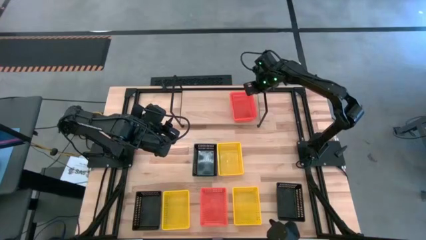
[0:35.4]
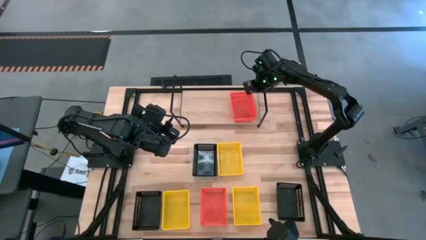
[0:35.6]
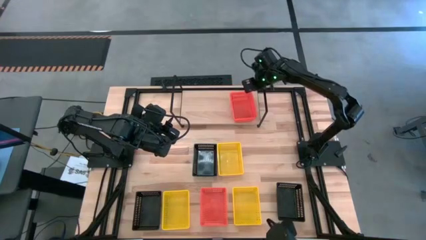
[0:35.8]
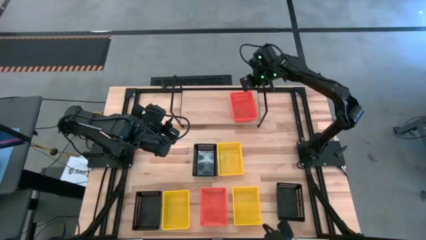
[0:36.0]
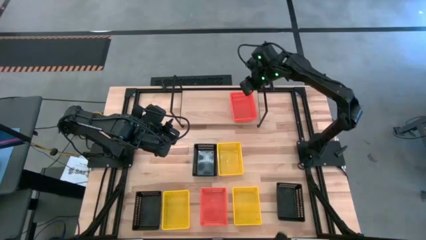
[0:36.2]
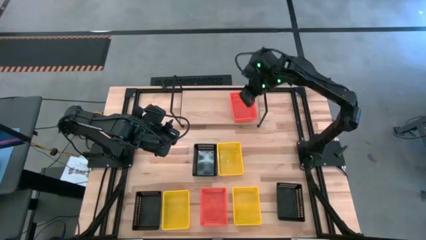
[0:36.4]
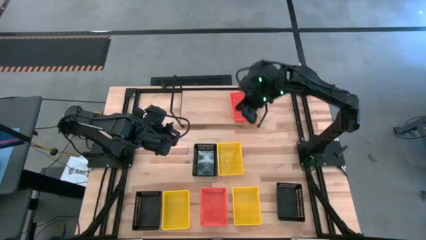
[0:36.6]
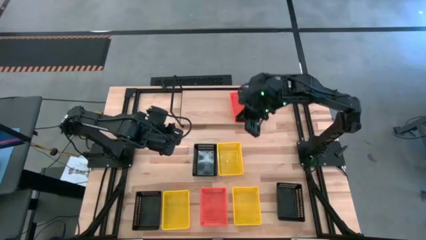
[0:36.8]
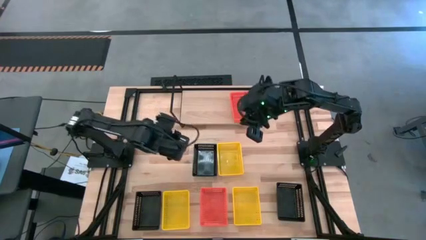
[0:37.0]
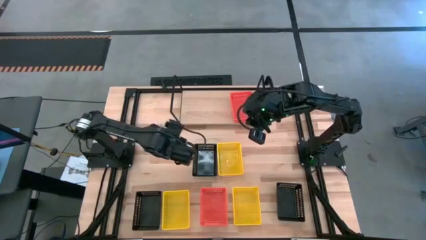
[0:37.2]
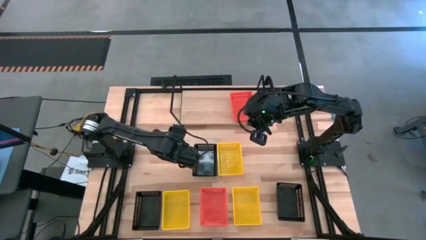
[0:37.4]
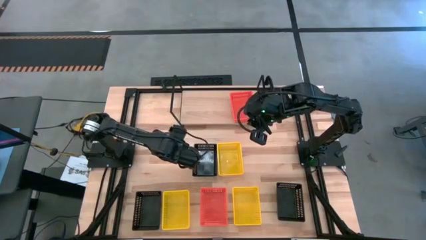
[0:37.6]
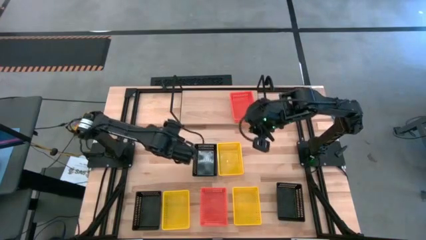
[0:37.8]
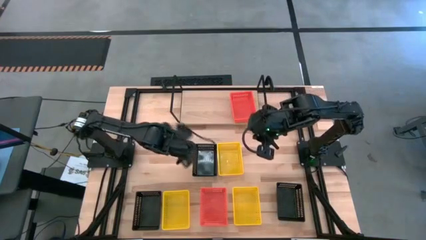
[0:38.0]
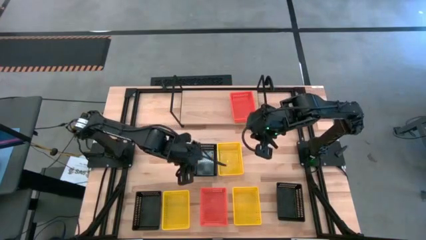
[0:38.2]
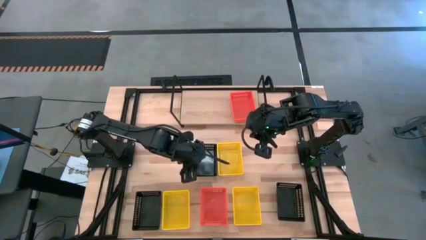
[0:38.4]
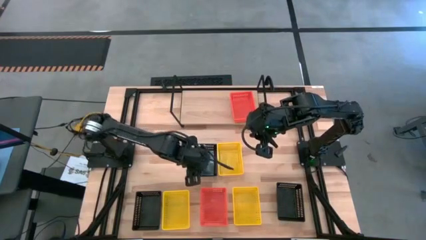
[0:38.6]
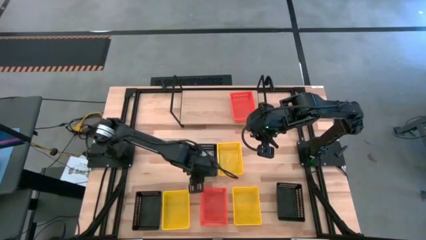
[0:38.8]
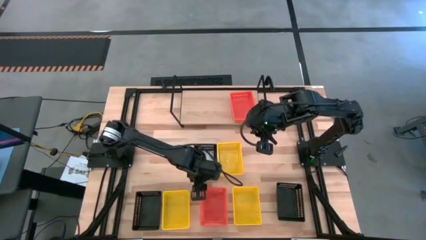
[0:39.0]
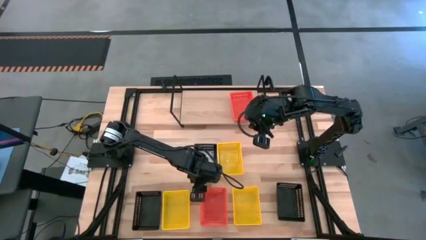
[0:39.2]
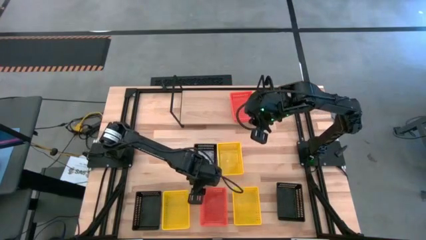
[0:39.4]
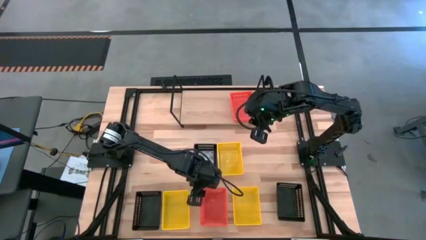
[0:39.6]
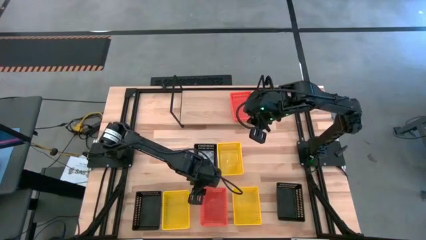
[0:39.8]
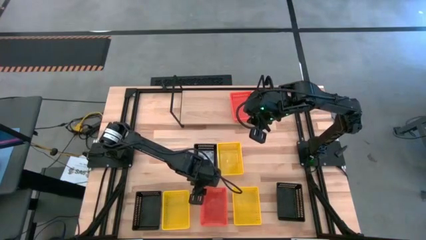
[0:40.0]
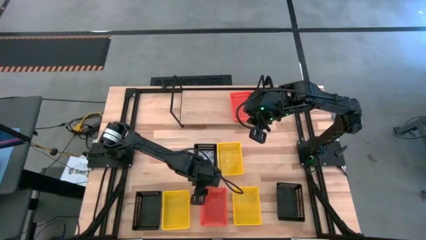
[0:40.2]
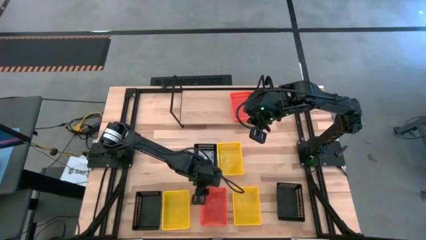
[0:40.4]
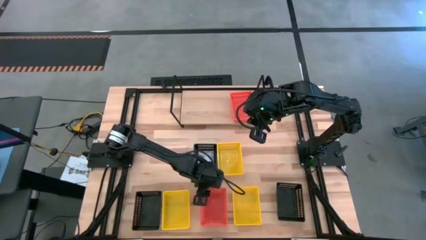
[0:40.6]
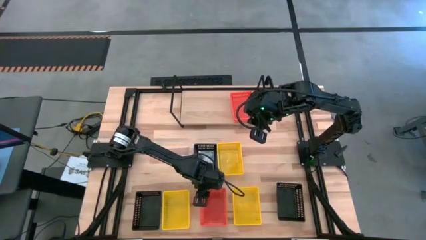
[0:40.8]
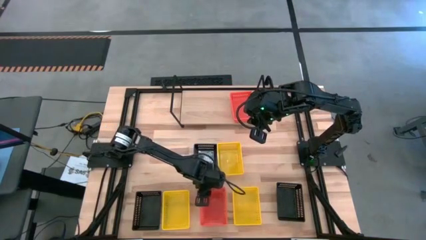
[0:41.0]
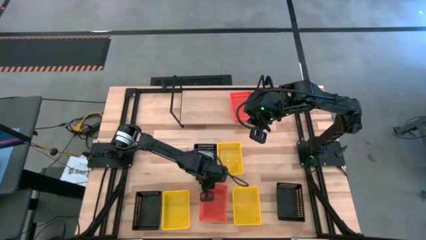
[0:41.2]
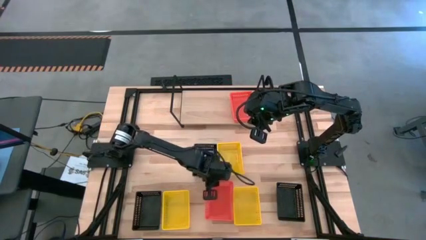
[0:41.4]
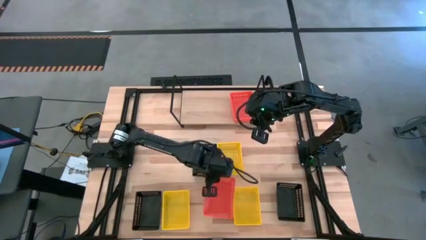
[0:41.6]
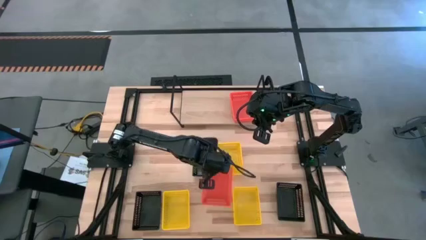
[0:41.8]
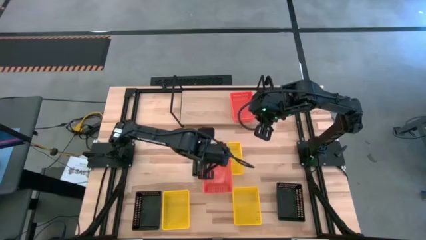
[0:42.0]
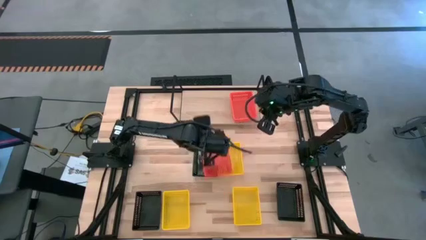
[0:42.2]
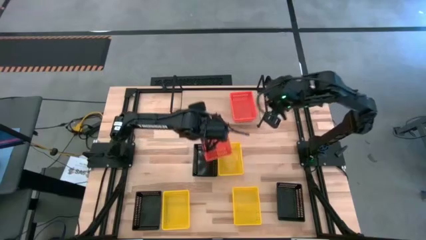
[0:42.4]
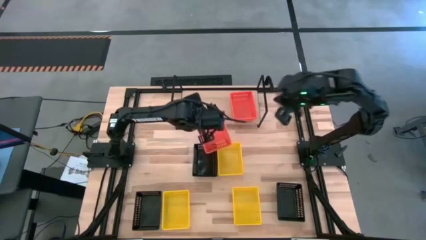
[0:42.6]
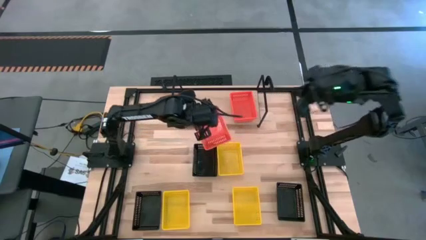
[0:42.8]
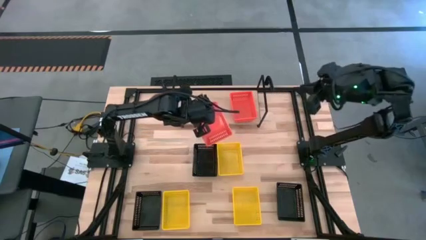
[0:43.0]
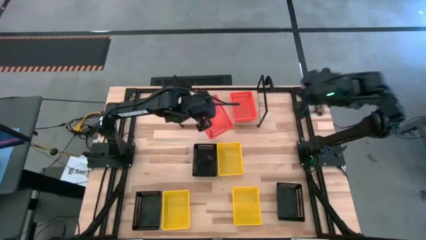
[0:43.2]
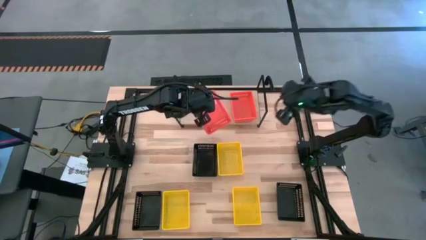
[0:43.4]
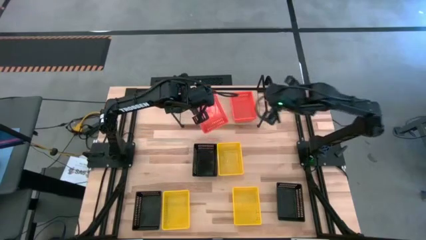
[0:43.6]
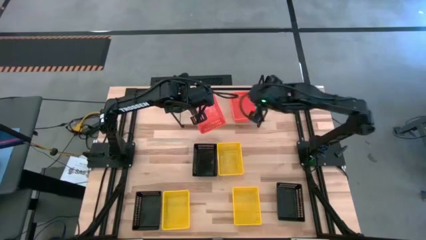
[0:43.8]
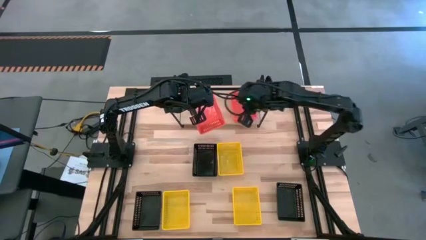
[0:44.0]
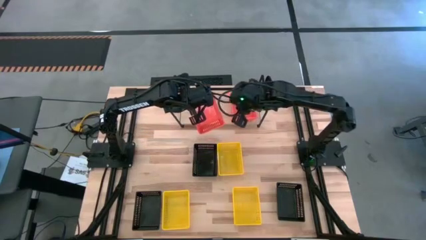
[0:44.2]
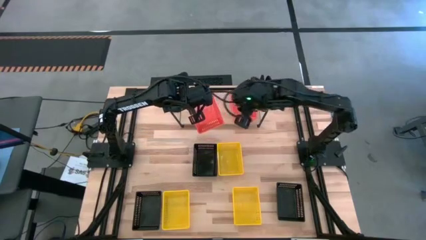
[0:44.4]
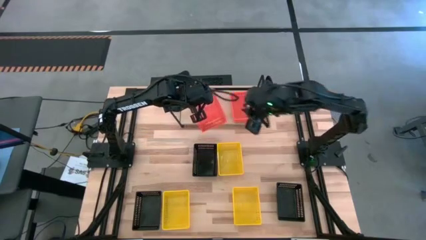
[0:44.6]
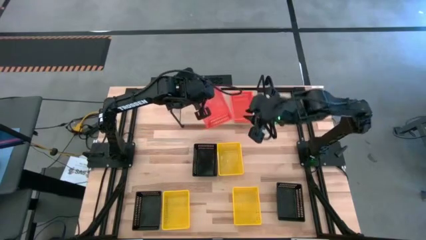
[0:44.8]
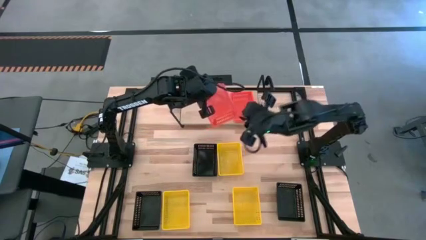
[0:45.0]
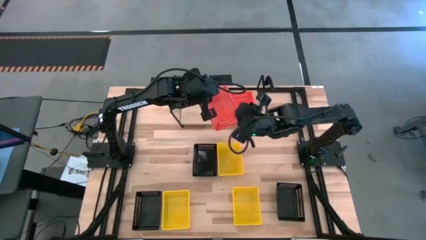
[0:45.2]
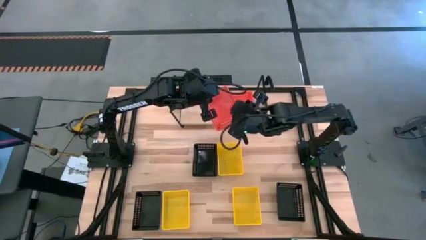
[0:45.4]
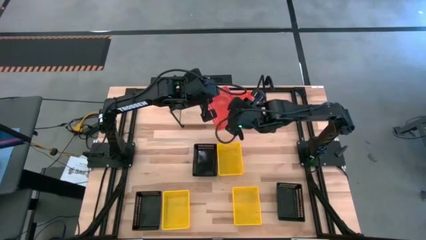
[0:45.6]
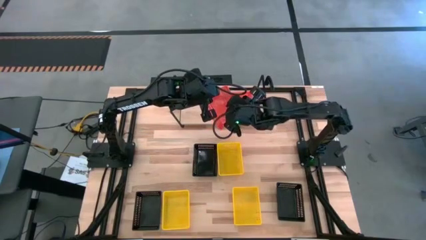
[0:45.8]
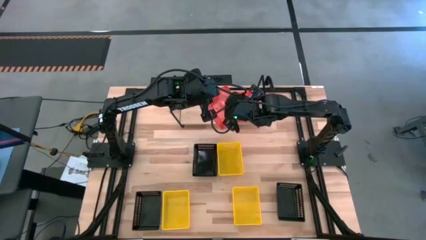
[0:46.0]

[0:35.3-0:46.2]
Task: Stack baskets on shelf by color
Stack the orange bin on top of the other stacked orange bins on the shelf
